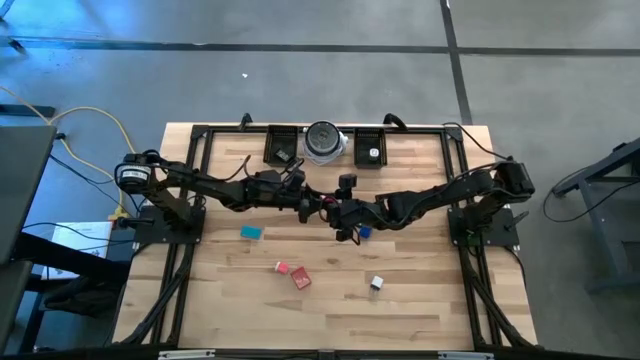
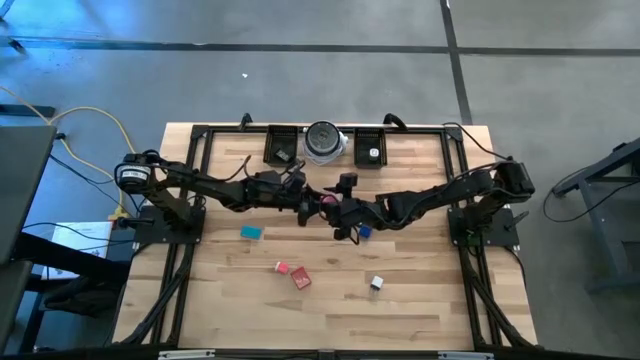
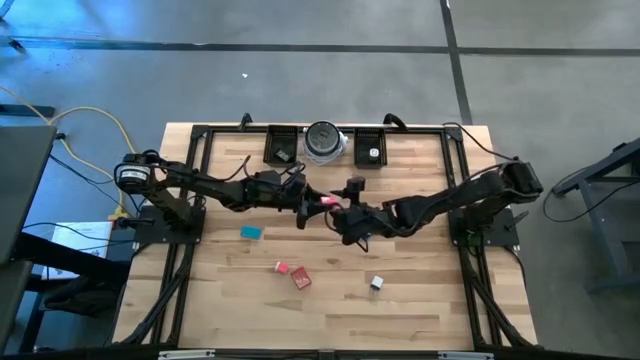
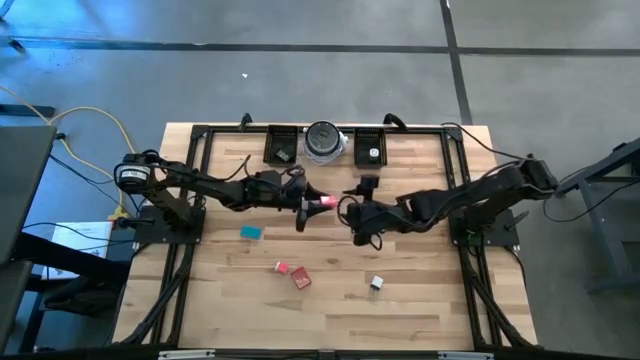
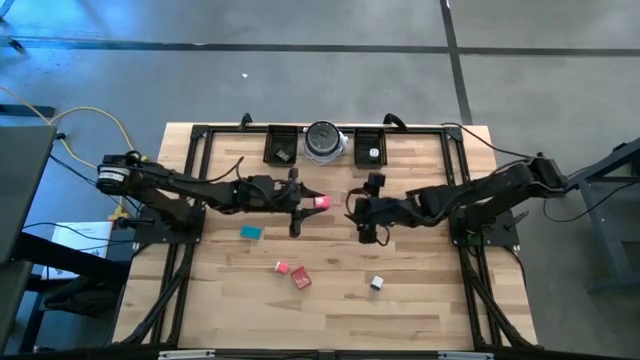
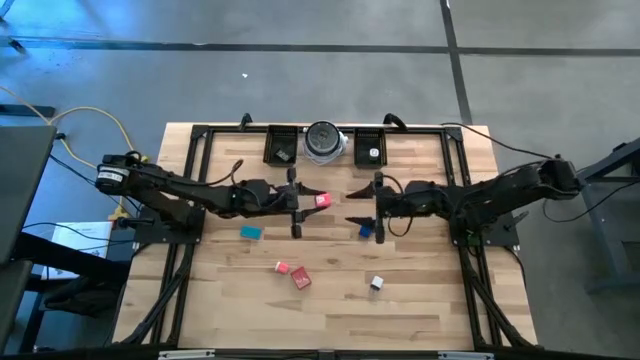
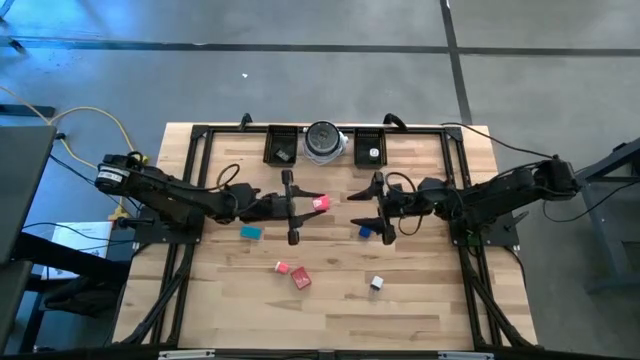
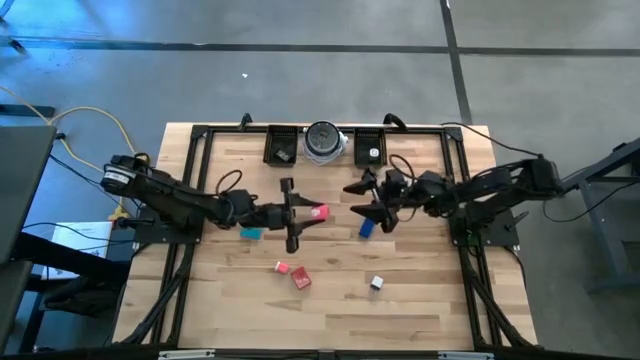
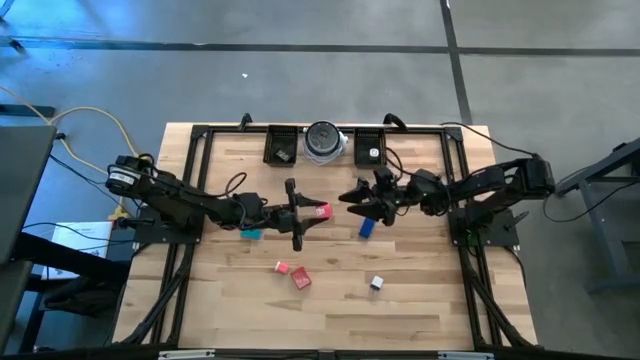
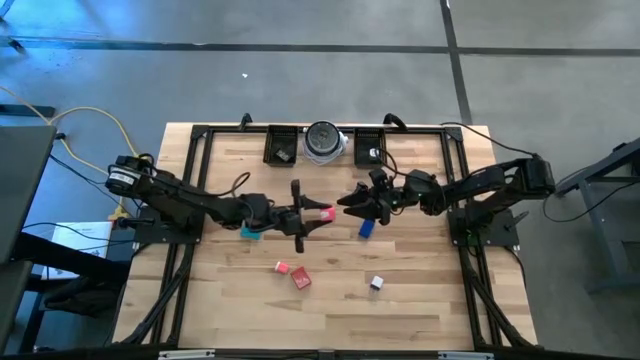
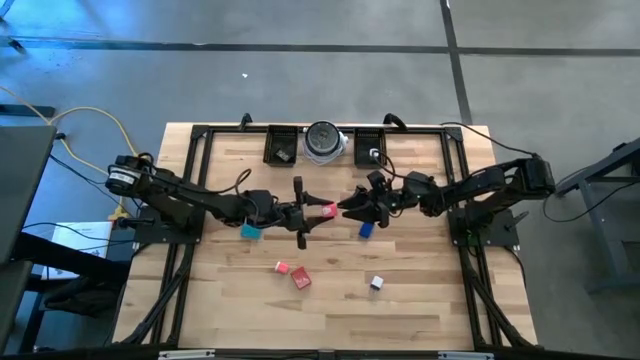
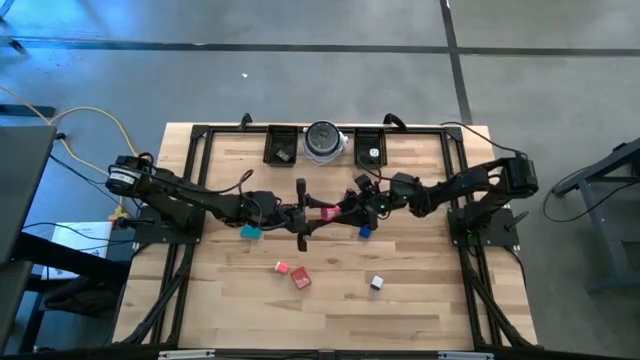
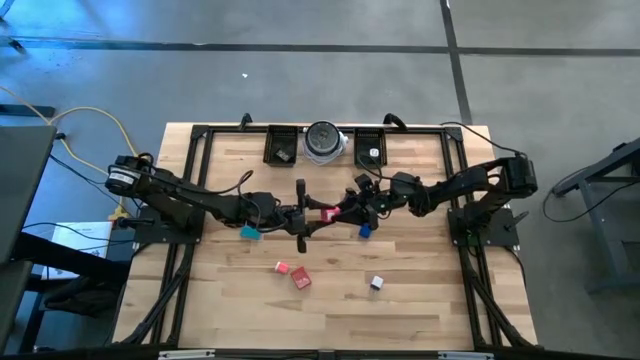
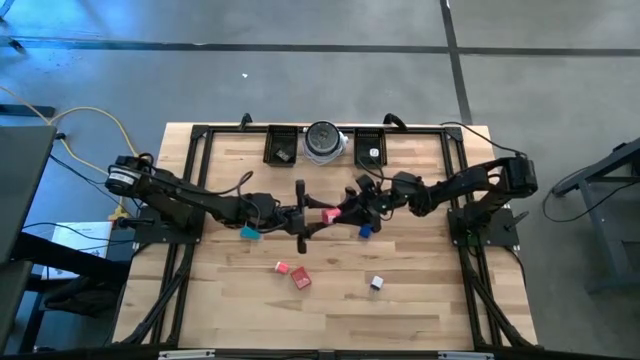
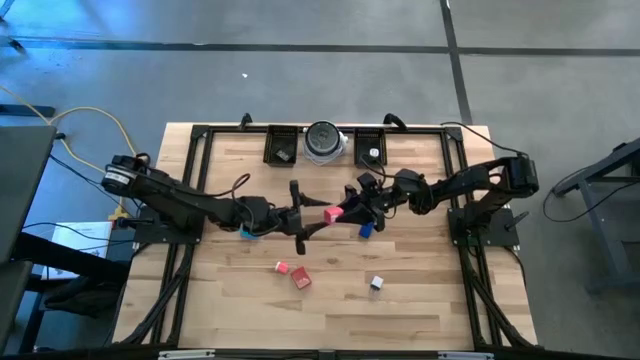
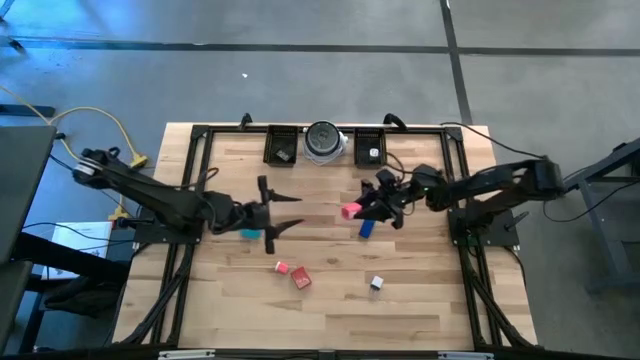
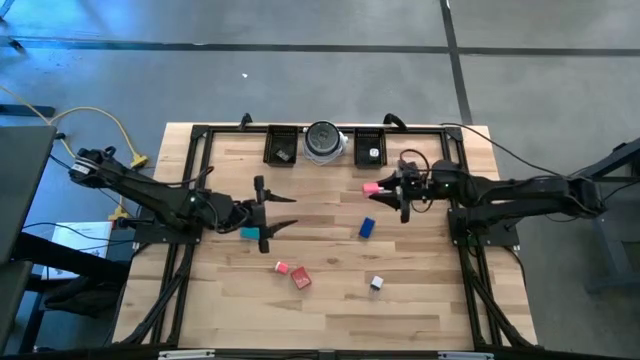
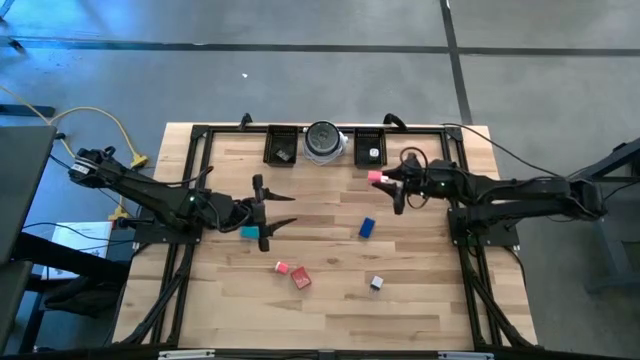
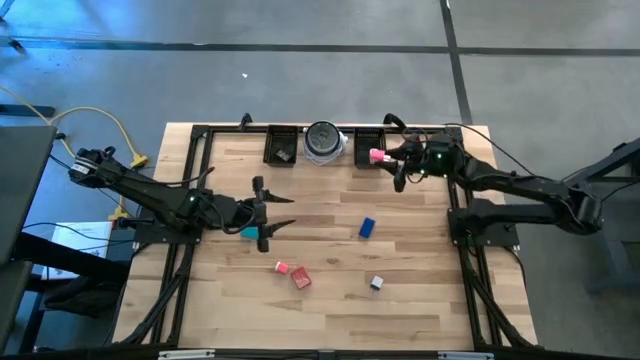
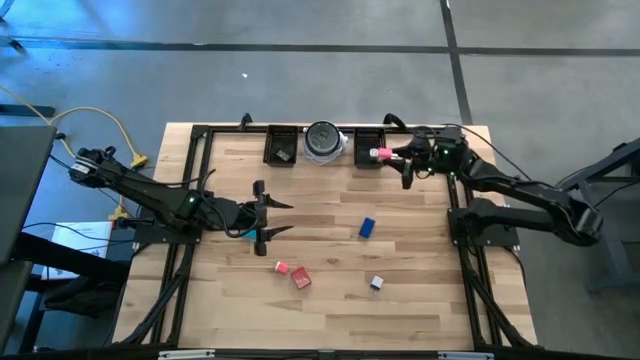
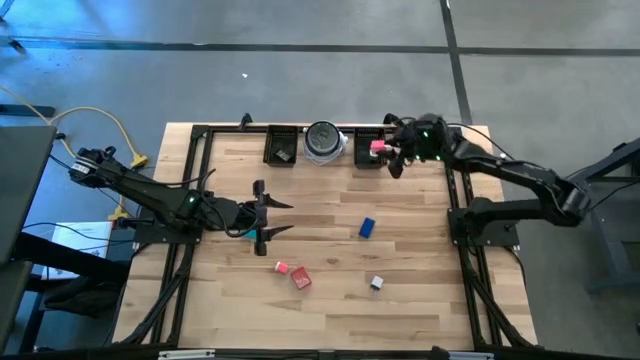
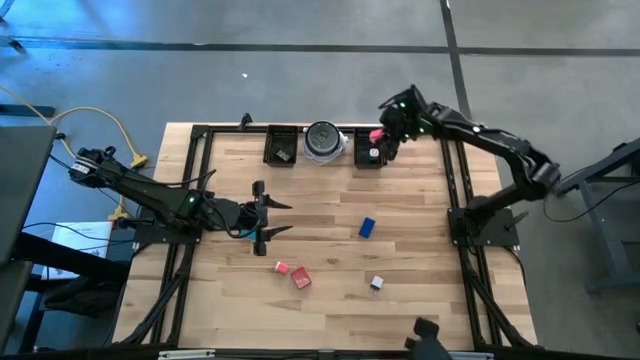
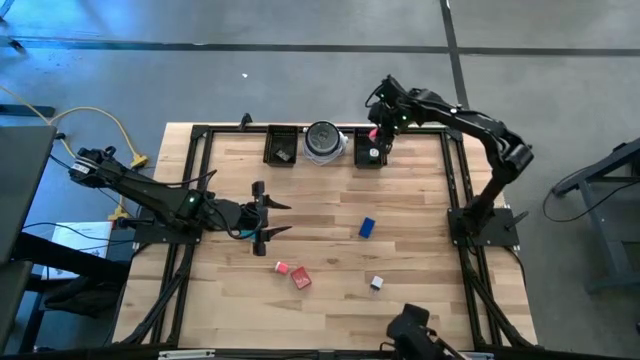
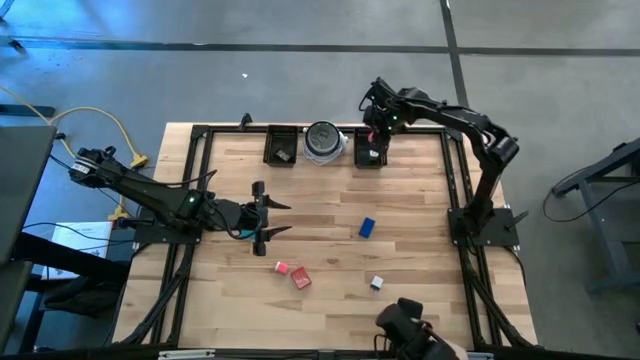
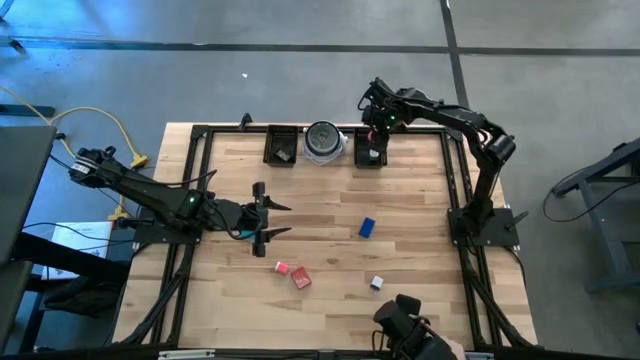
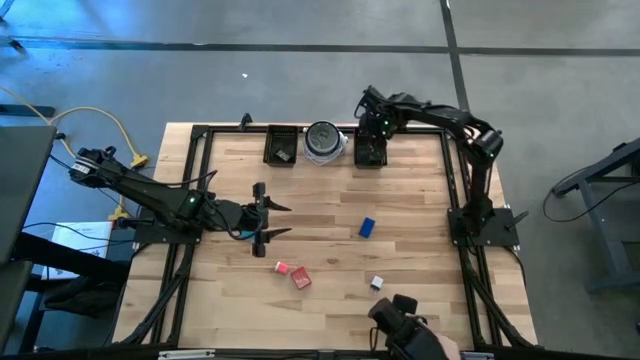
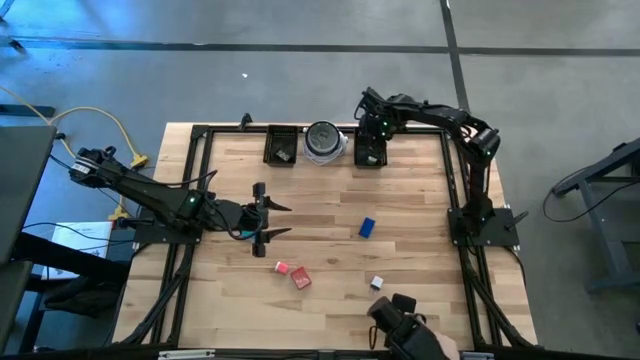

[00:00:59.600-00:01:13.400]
Task: Pick & Place Office items
Put the pink charger adapter into the right black basket

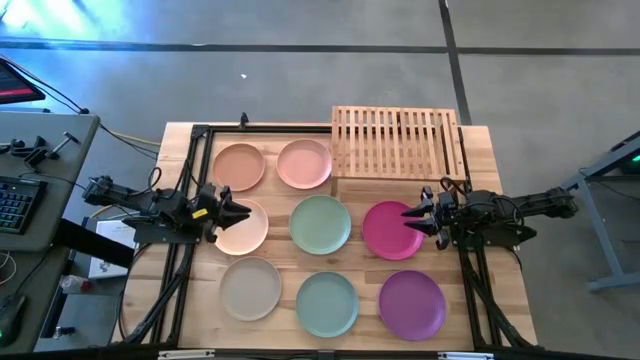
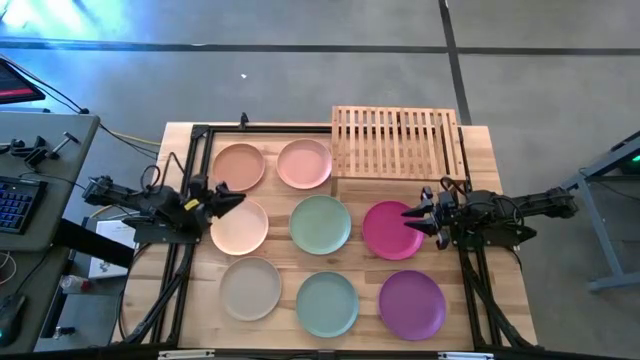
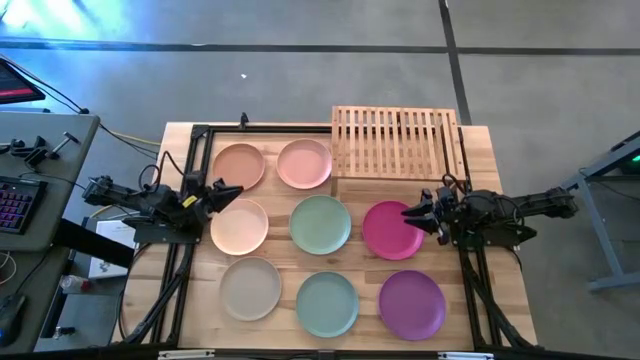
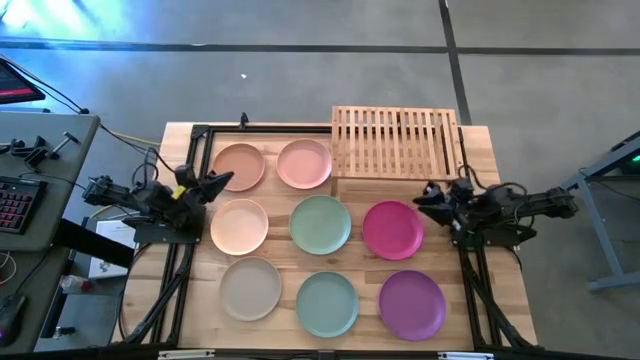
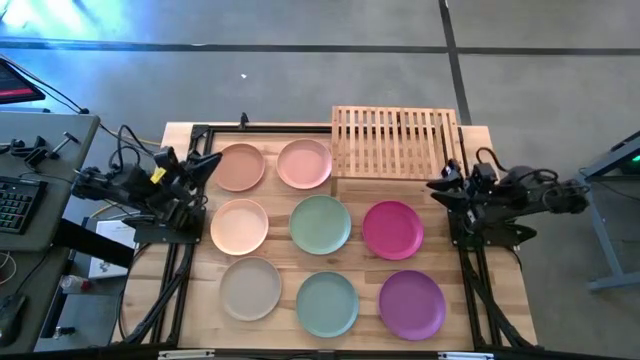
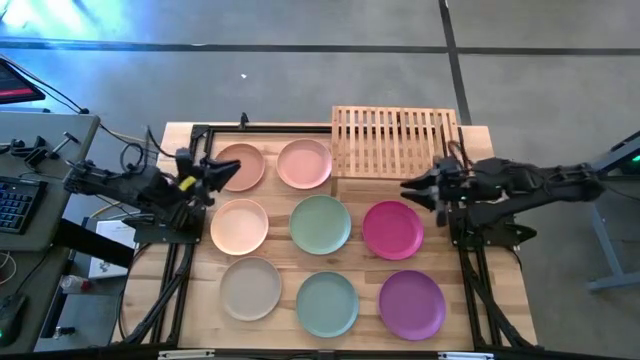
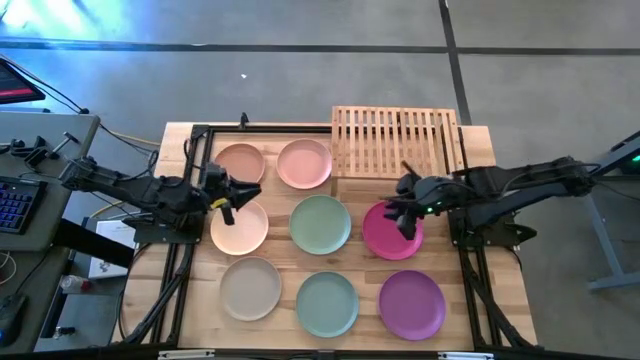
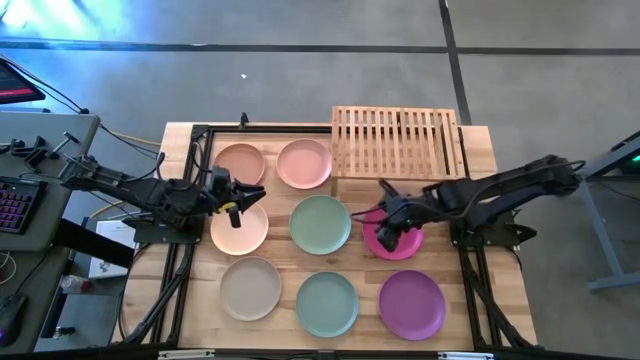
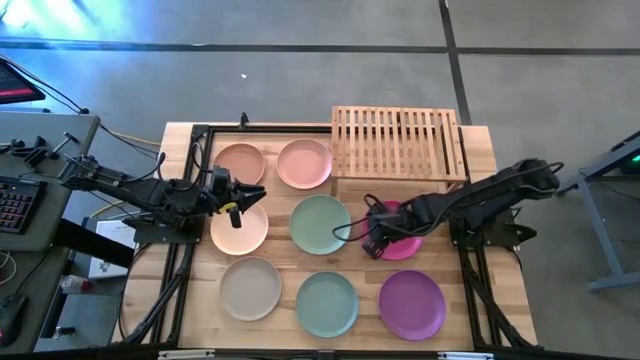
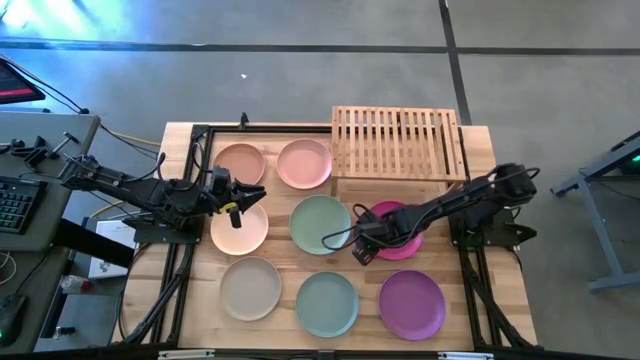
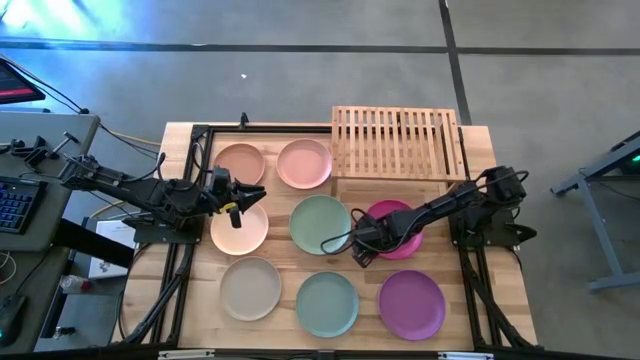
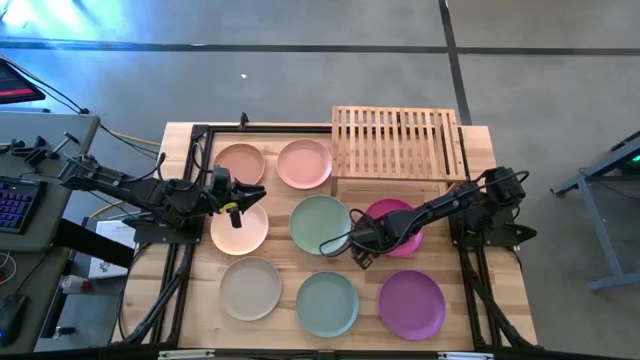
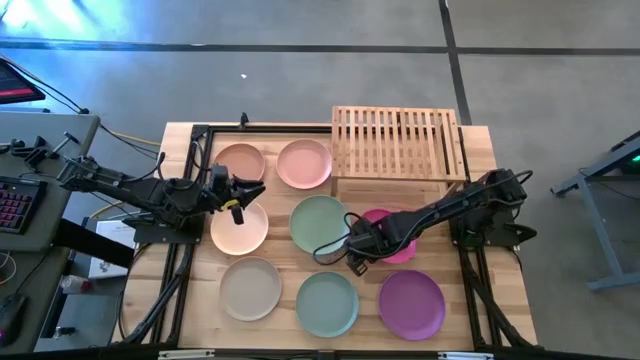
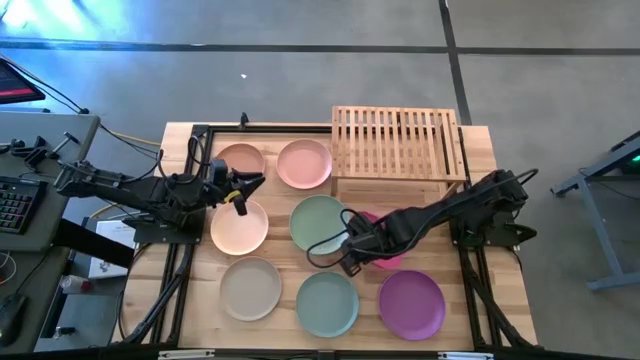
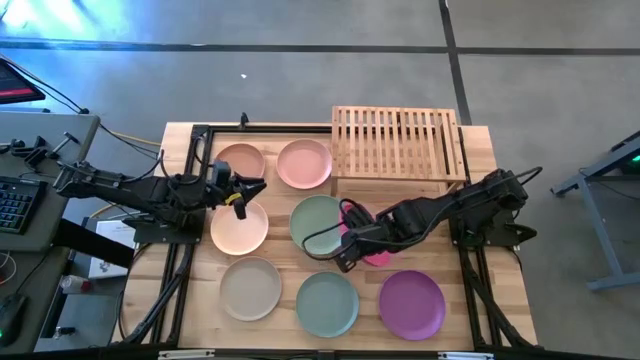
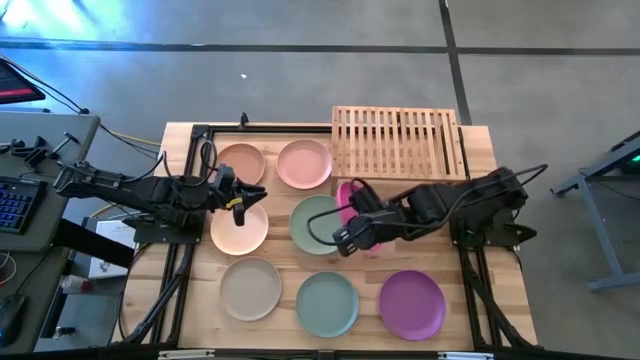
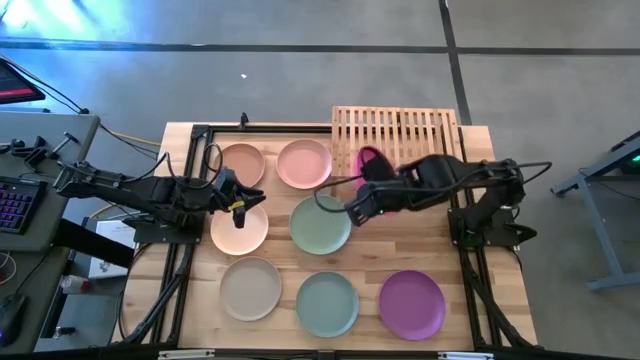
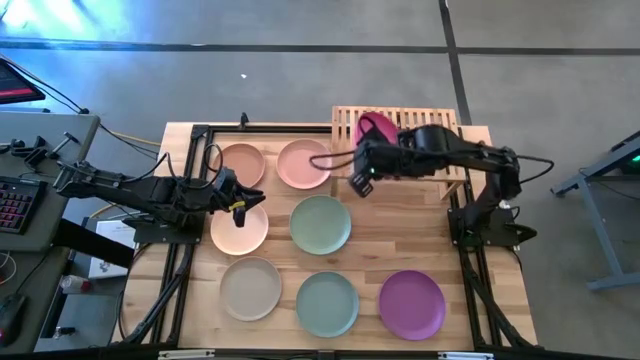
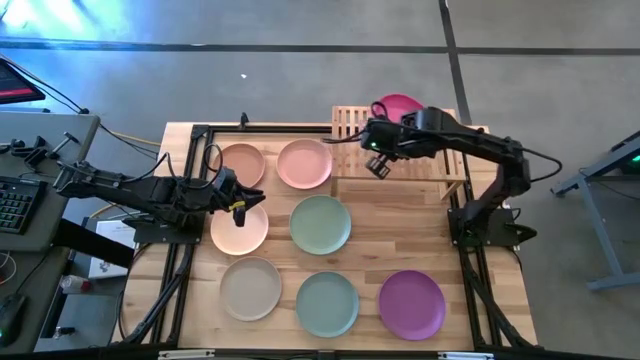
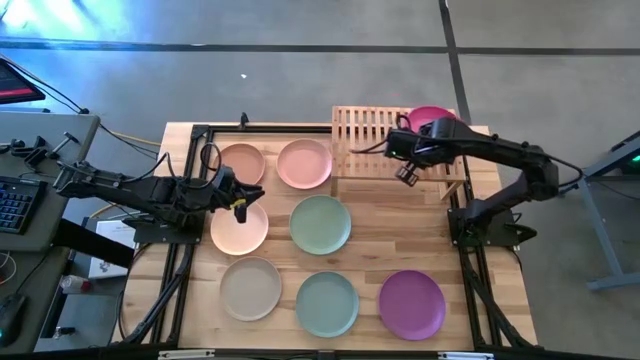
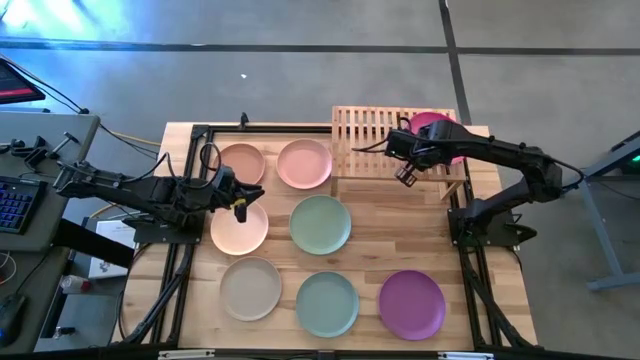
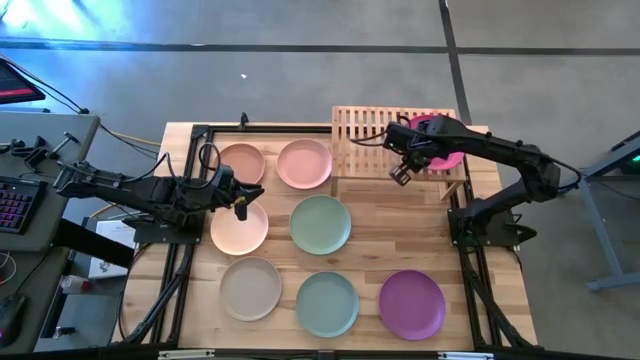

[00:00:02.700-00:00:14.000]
Task: Place and stack plates onto a shelf
Put the pink plate on the shelf
